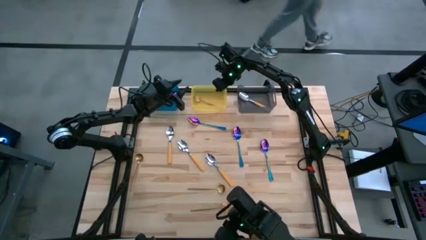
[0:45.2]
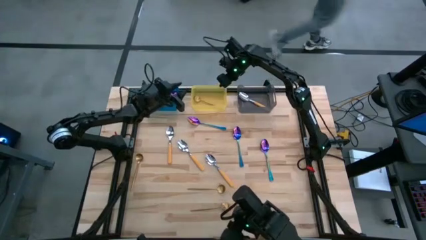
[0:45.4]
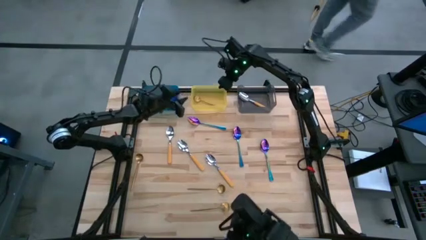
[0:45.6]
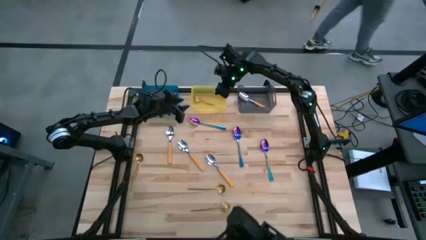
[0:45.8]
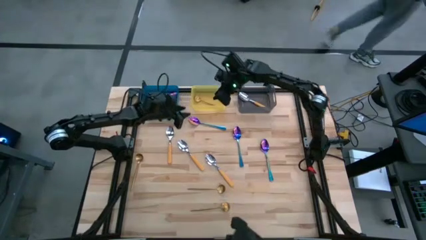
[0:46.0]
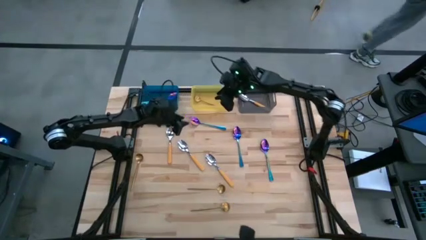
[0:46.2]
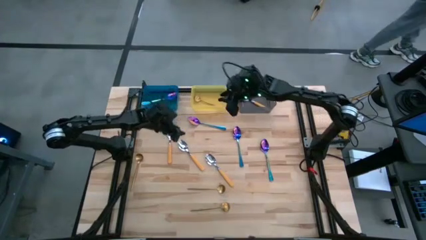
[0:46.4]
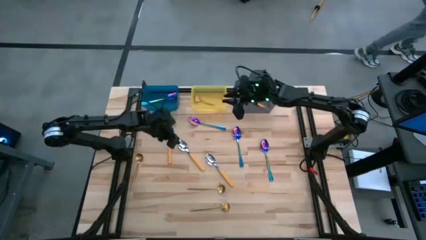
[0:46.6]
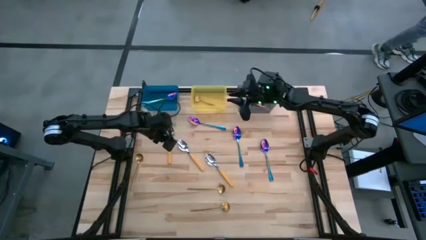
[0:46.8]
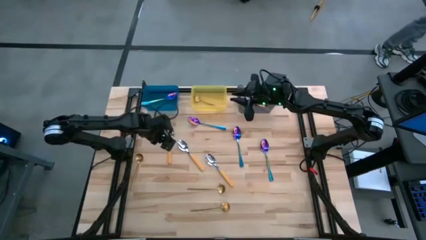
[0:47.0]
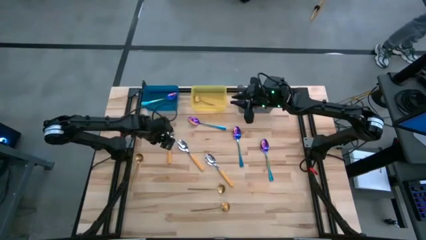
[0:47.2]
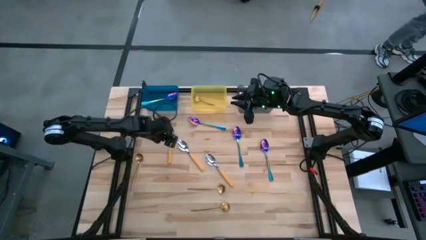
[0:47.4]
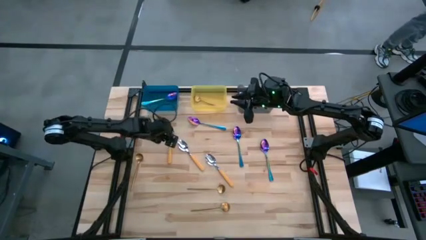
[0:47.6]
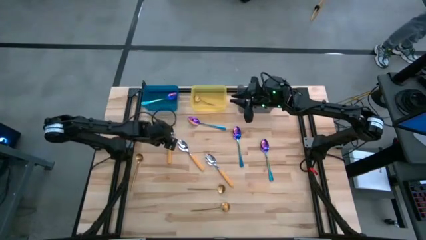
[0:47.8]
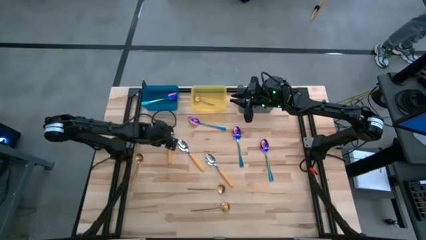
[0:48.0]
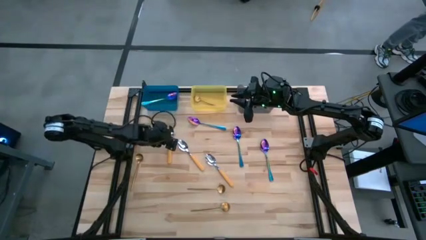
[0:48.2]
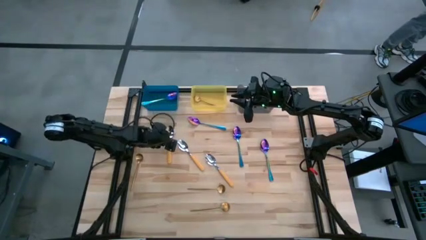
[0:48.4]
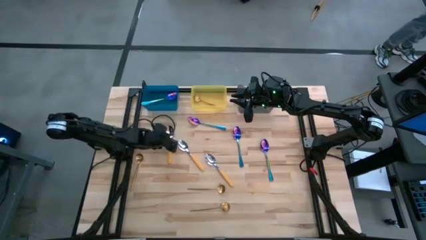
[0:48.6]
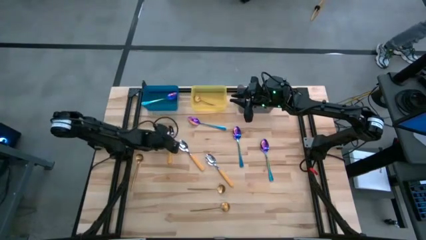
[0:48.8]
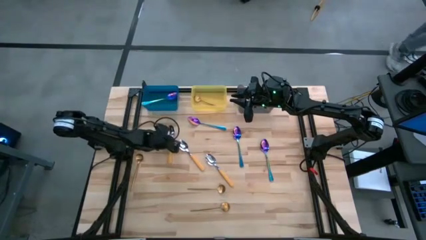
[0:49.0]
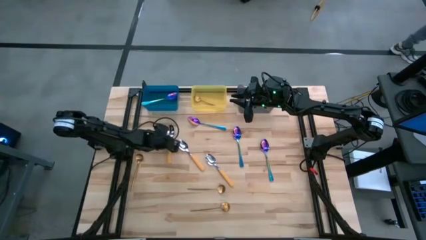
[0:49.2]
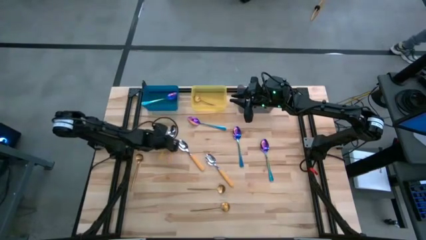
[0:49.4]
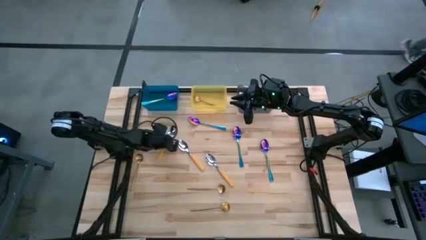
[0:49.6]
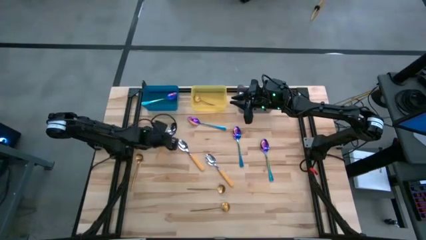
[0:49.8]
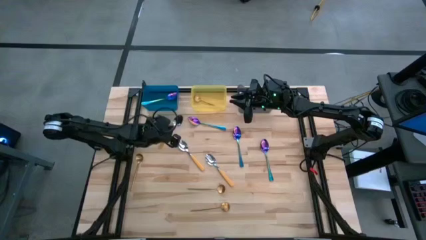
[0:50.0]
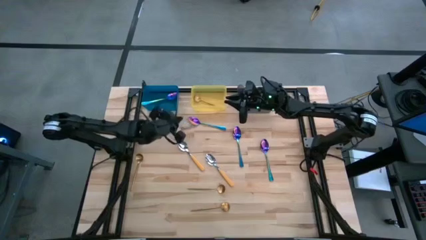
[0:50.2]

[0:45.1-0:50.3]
Task: Sort silverware by color (type)
Put the yellow spoon into the black bin

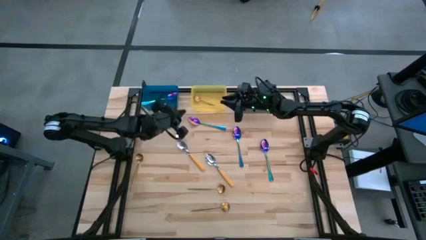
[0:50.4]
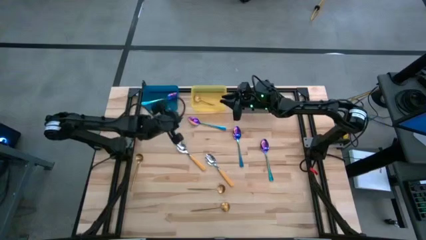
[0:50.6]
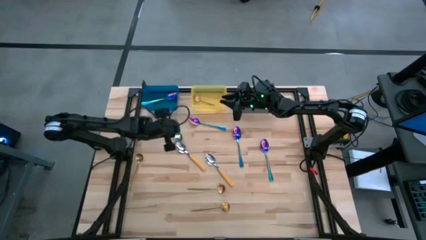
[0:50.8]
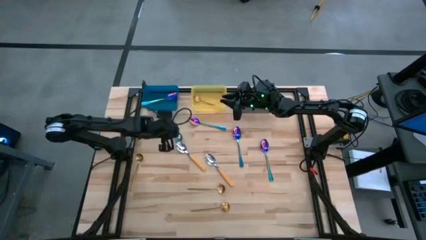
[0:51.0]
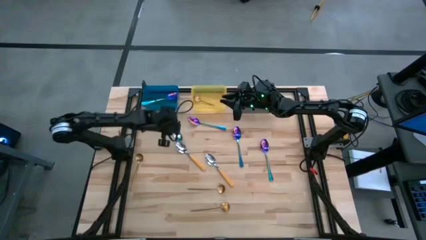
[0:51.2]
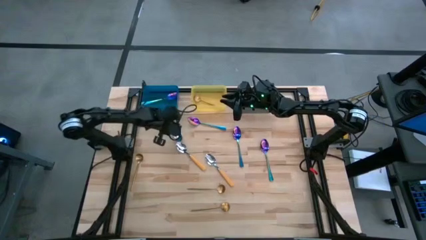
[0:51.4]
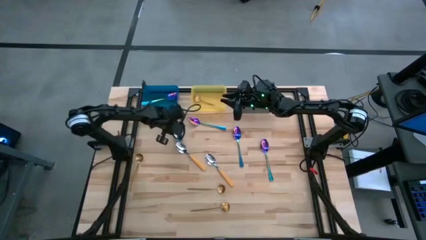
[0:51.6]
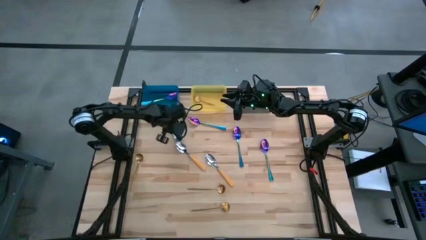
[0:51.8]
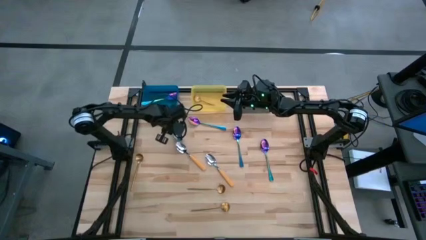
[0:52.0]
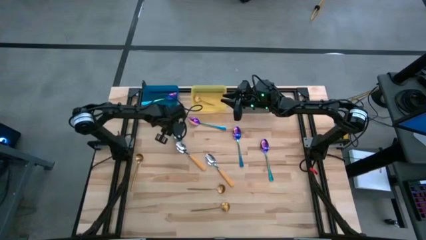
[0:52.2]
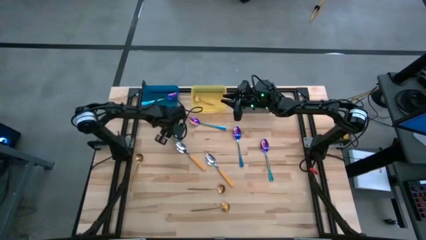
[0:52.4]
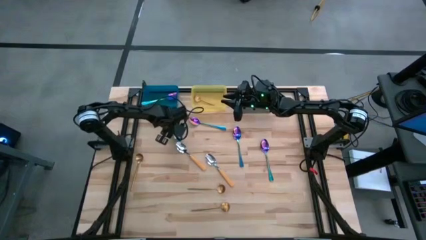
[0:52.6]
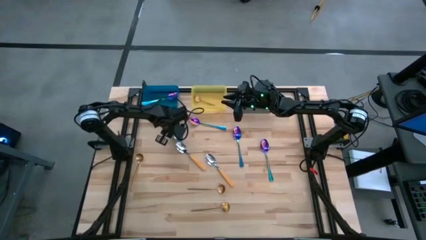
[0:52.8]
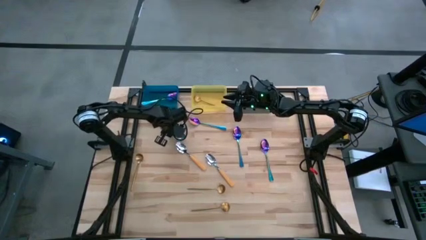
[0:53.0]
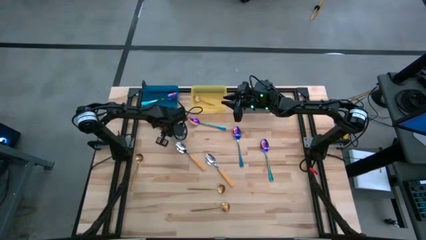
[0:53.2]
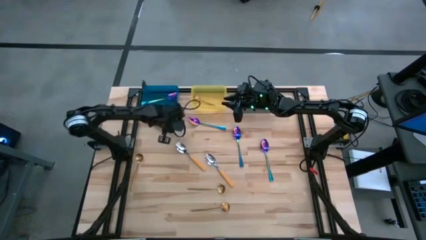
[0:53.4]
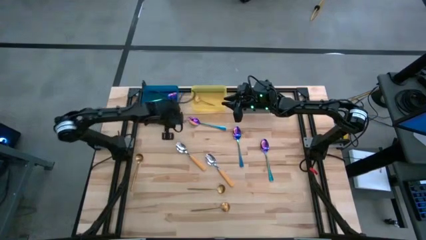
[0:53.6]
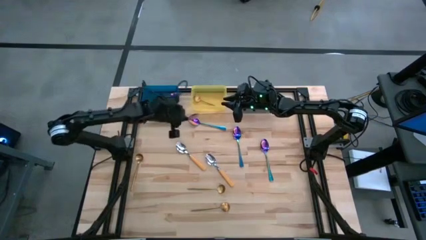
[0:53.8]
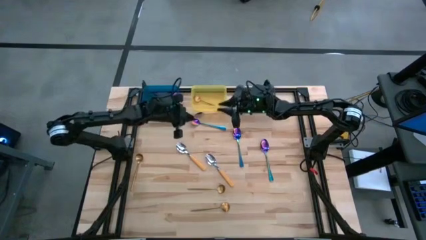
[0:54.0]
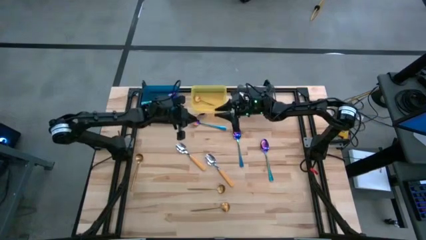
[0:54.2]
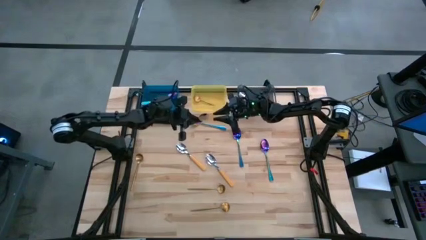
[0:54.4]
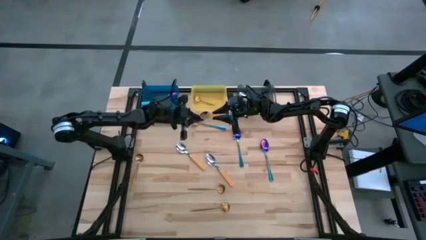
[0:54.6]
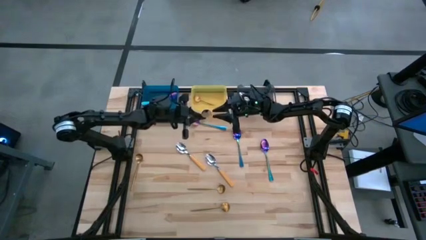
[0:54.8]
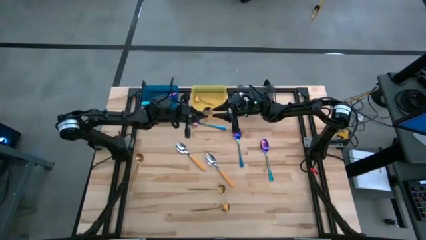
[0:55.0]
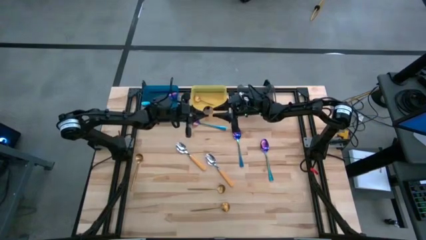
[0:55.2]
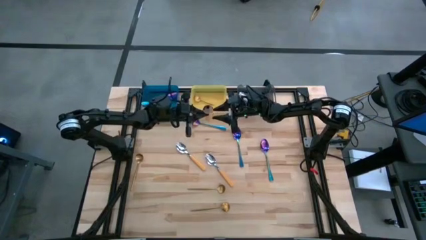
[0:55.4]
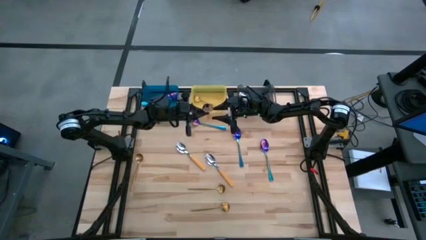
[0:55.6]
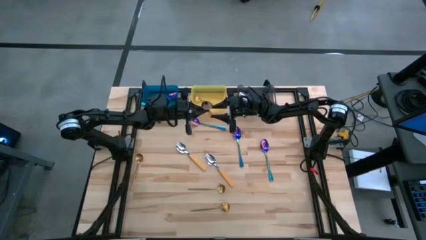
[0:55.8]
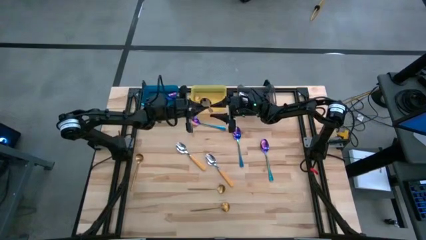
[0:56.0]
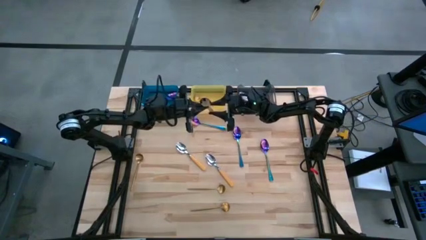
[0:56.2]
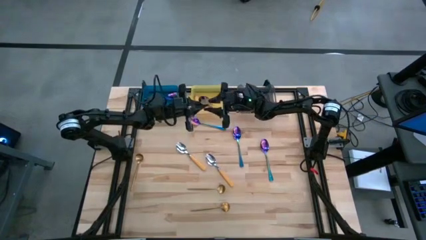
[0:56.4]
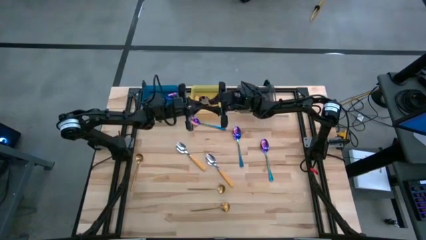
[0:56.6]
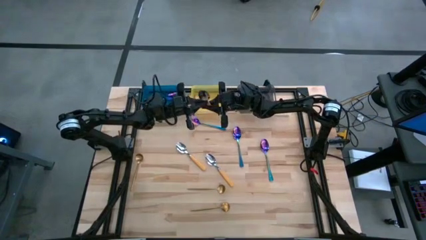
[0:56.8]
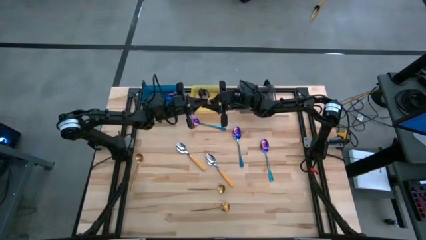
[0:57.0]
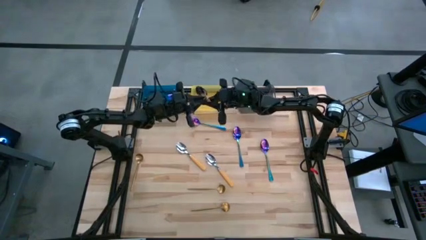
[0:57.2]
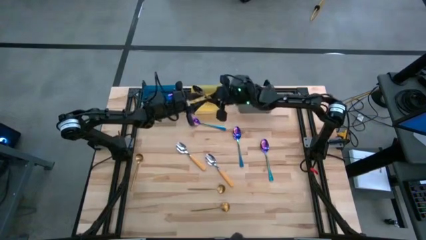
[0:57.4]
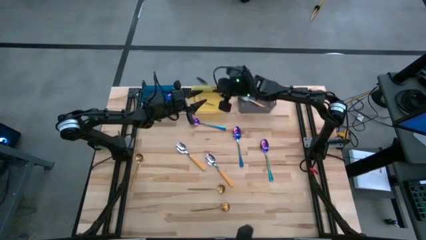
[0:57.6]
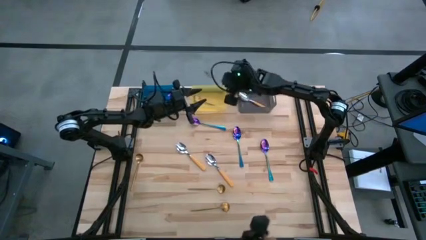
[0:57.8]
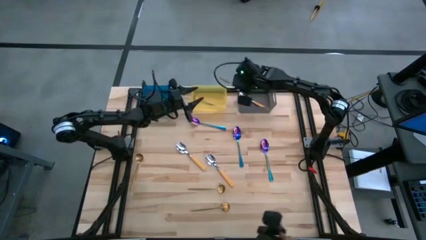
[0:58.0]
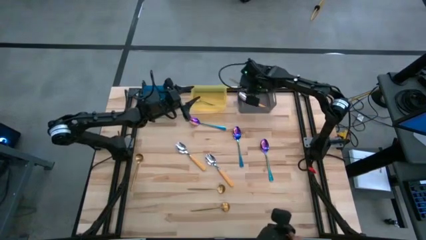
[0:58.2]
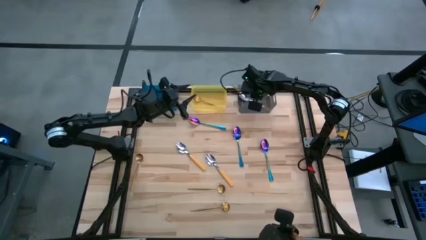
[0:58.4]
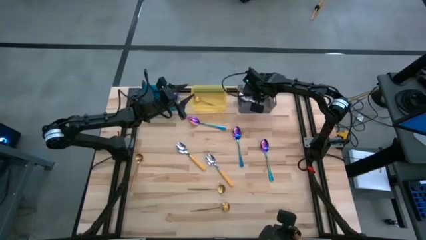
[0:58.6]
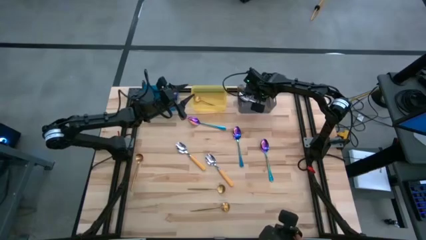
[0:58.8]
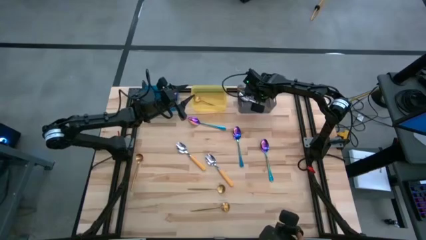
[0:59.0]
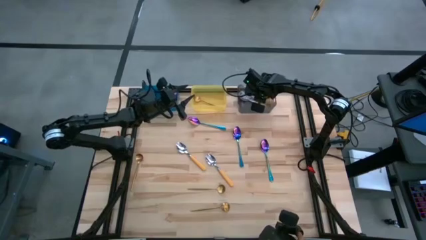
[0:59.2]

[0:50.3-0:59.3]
Put the yellow spoon into the black bin

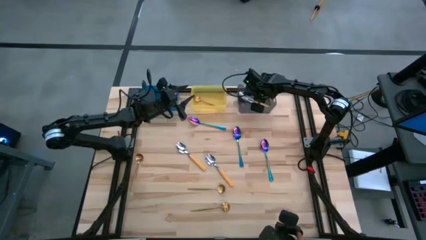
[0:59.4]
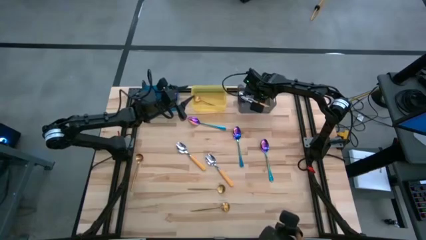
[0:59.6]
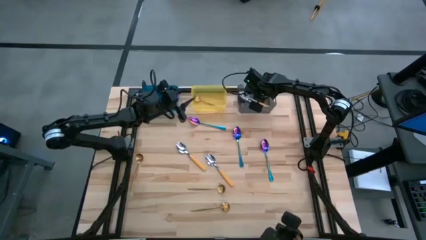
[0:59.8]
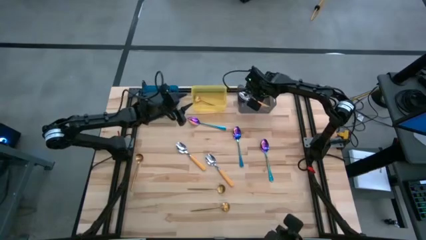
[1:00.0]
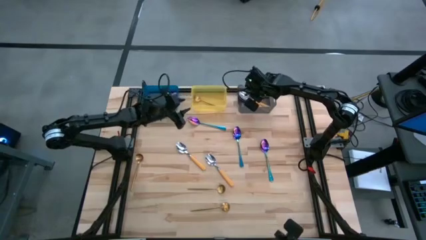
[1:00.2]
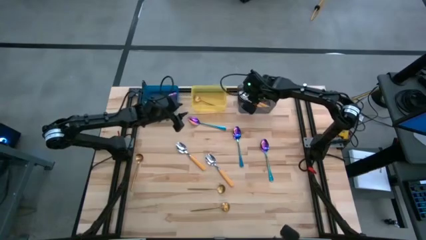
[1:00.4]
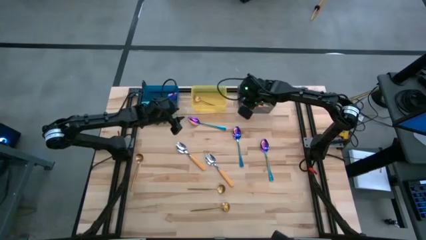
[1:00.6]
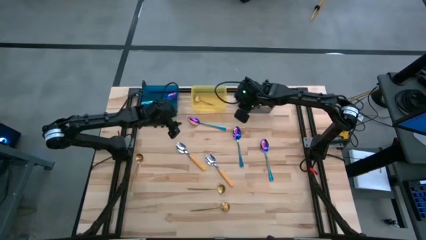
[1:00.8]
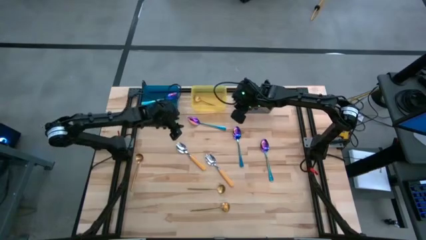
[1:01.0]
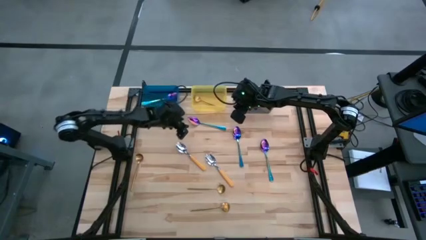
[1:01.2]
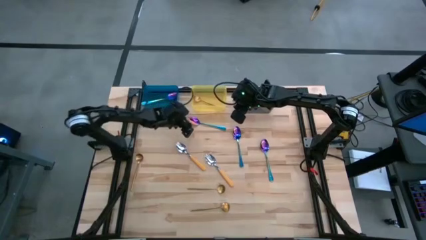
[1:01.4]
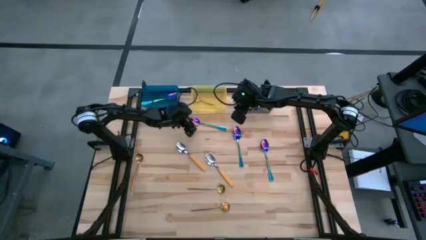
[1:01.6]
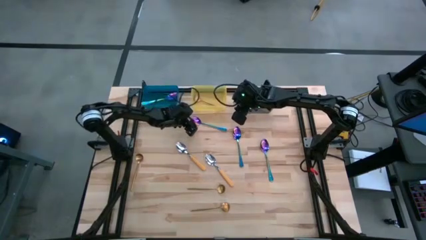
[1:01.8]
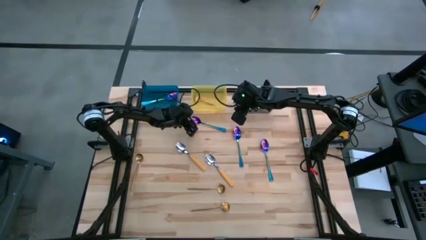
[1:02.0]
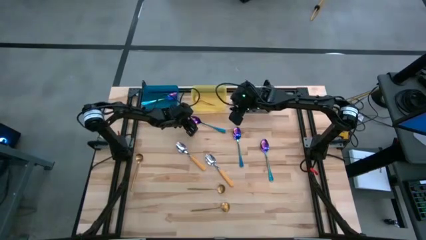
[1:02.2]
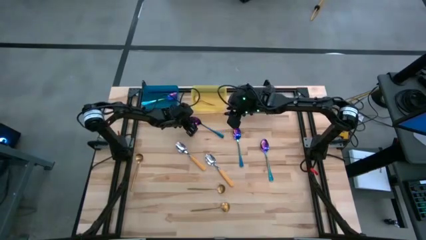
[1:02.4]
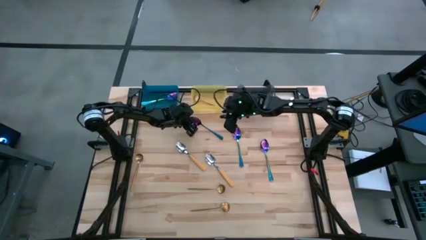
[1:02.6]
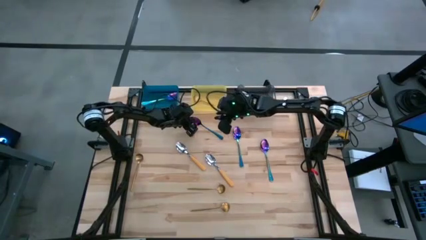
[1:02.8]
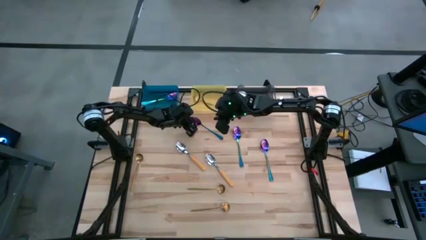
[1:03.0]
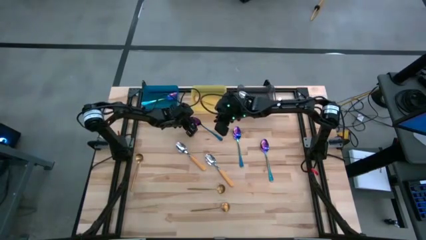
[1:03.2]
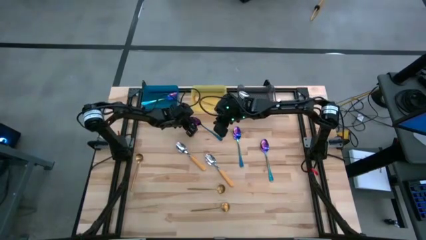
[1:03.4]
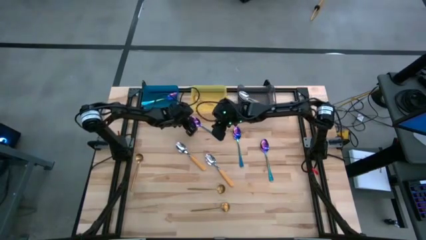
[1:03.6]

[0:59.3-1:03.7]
Put the blue spoon into the blue bin
